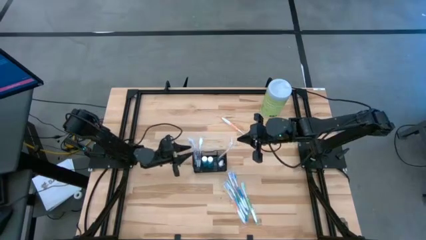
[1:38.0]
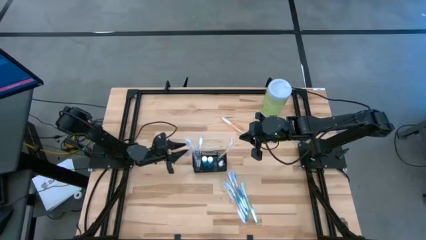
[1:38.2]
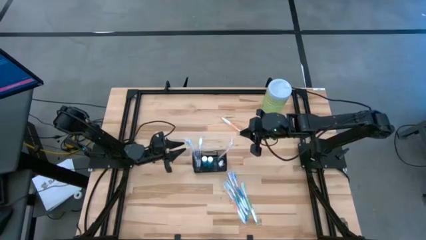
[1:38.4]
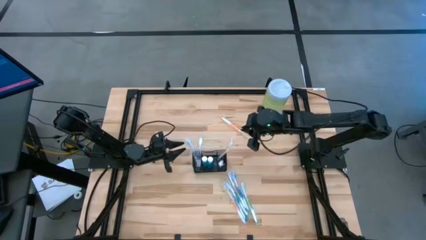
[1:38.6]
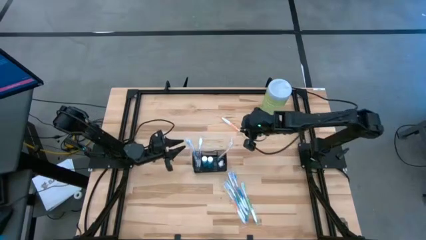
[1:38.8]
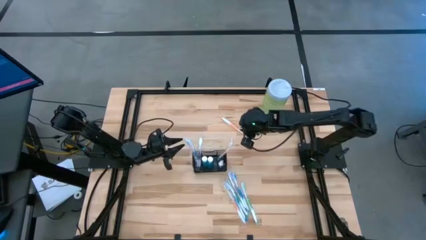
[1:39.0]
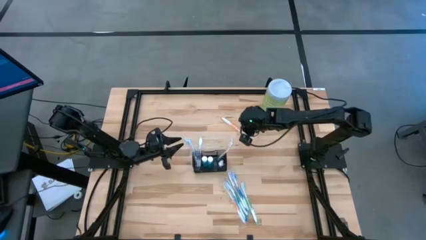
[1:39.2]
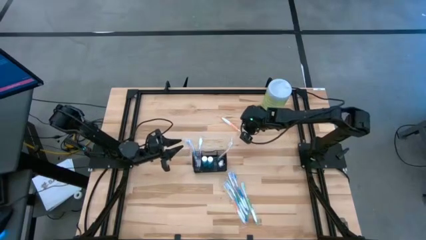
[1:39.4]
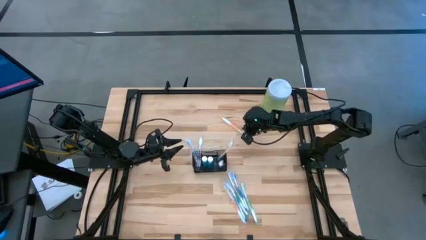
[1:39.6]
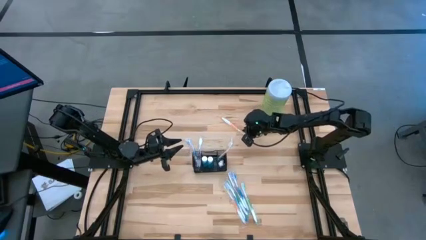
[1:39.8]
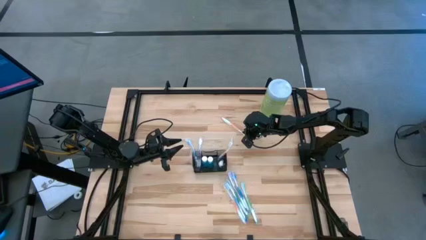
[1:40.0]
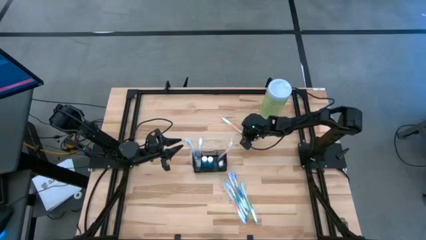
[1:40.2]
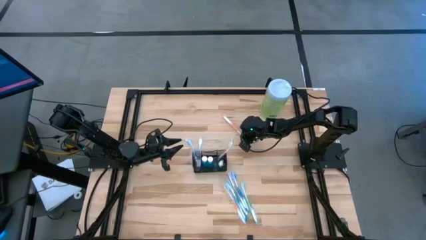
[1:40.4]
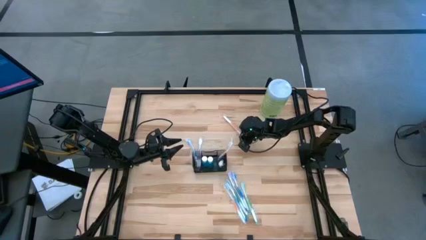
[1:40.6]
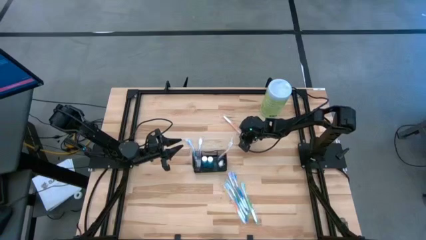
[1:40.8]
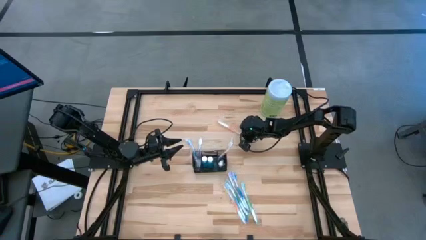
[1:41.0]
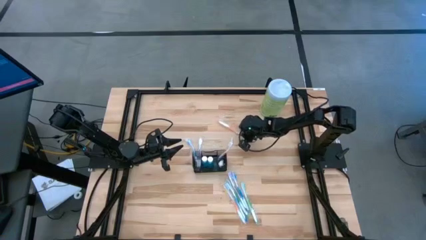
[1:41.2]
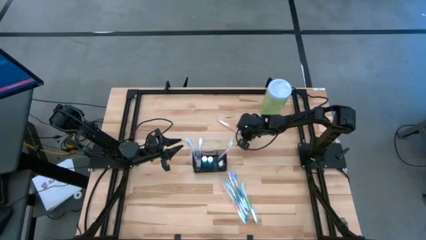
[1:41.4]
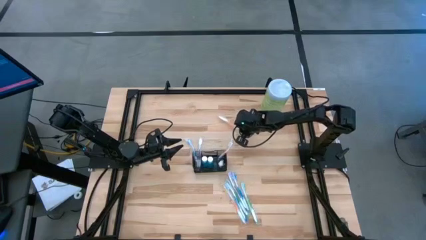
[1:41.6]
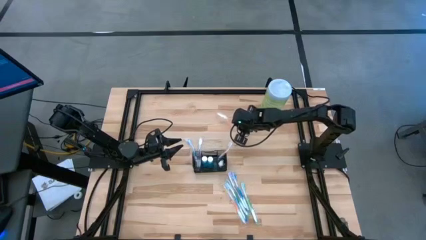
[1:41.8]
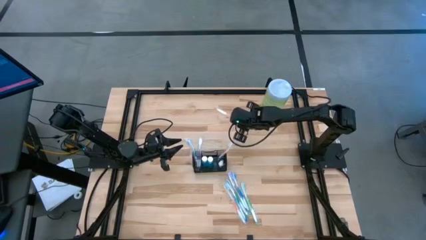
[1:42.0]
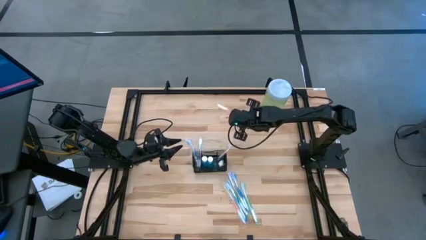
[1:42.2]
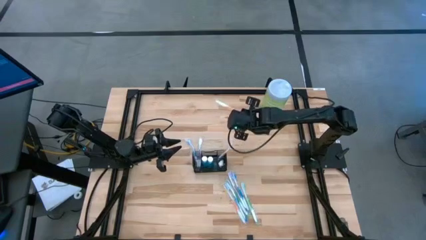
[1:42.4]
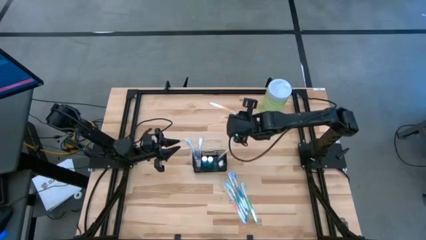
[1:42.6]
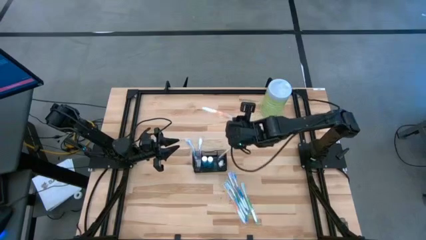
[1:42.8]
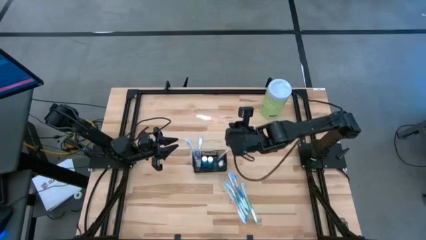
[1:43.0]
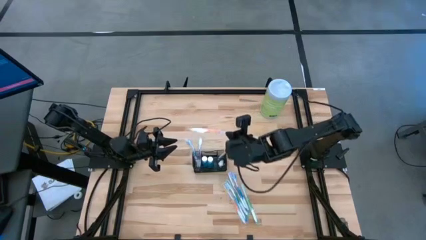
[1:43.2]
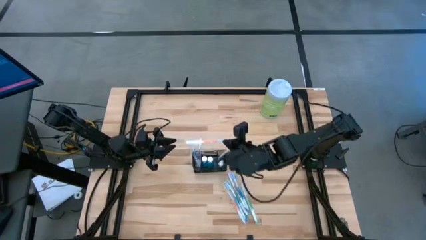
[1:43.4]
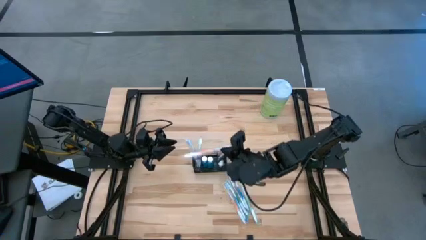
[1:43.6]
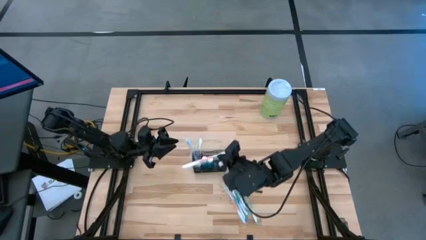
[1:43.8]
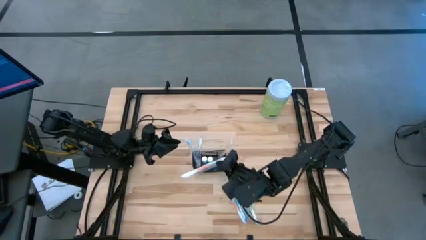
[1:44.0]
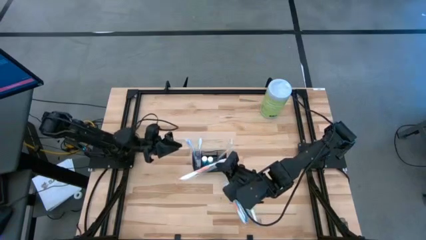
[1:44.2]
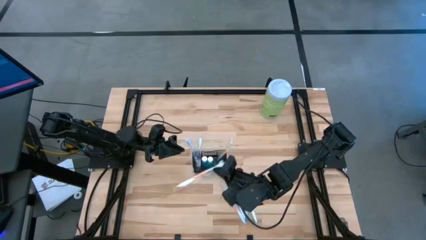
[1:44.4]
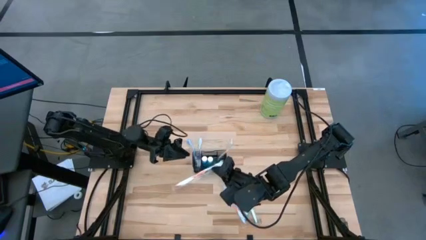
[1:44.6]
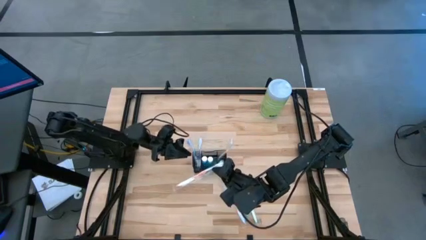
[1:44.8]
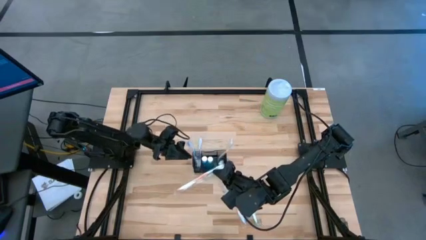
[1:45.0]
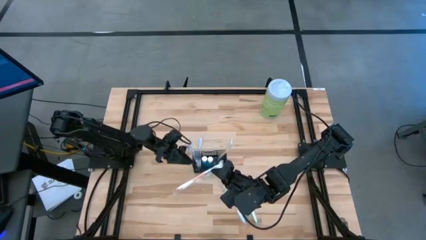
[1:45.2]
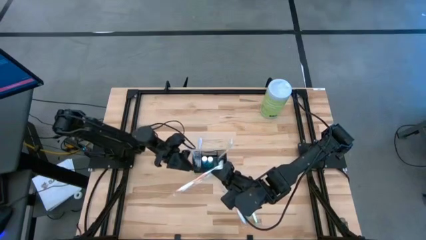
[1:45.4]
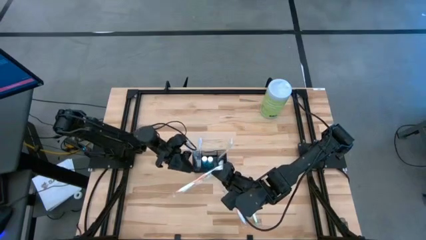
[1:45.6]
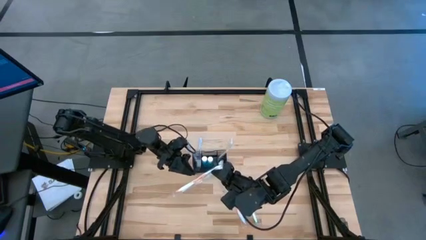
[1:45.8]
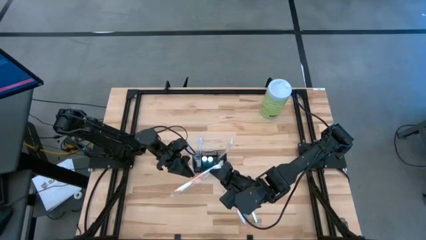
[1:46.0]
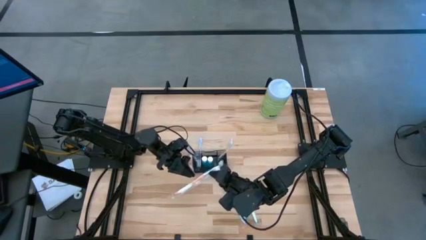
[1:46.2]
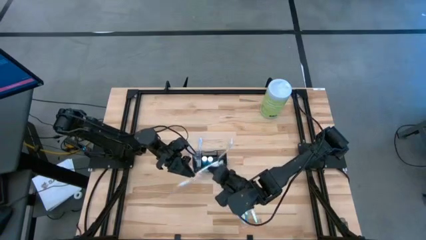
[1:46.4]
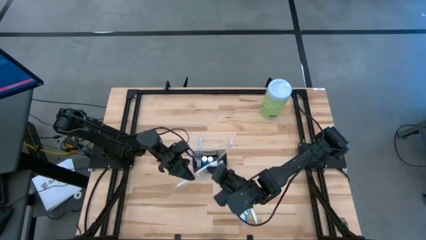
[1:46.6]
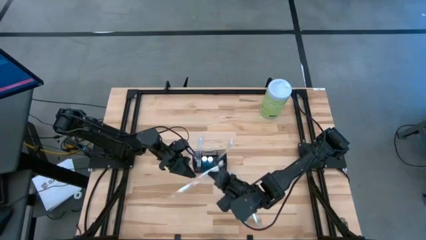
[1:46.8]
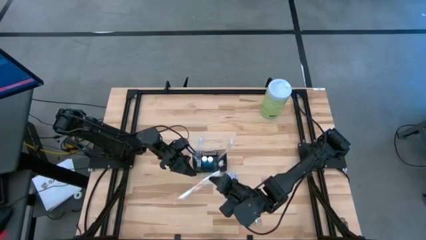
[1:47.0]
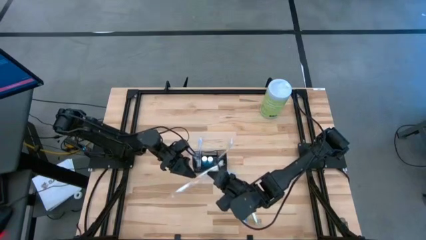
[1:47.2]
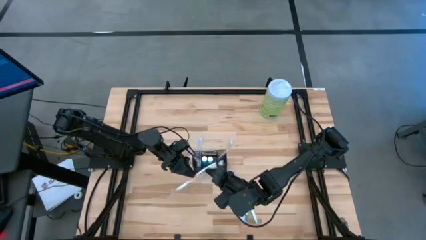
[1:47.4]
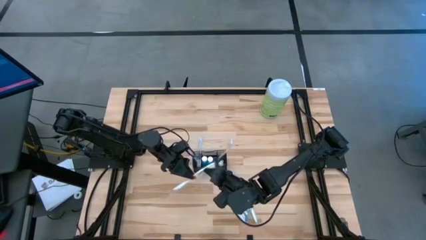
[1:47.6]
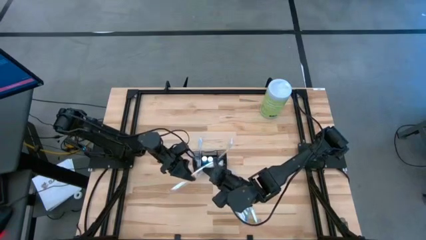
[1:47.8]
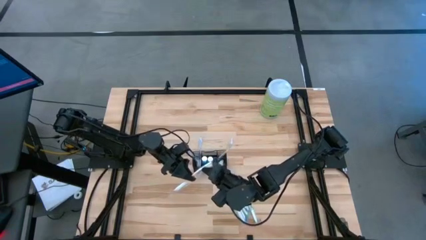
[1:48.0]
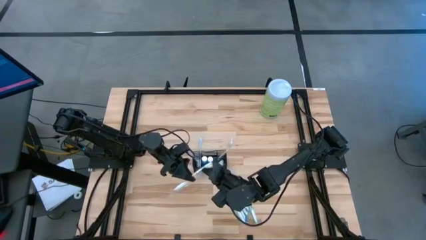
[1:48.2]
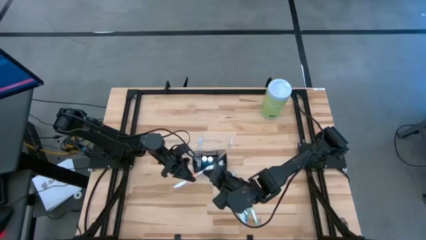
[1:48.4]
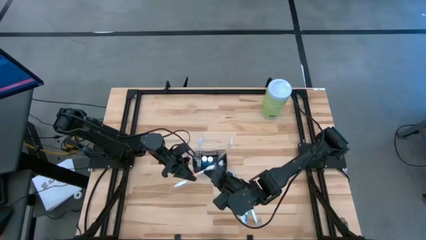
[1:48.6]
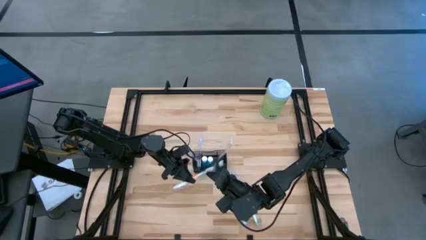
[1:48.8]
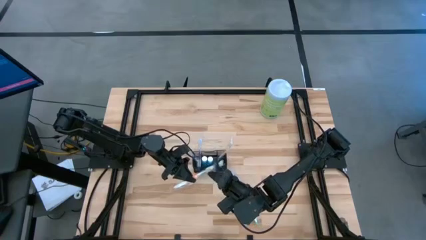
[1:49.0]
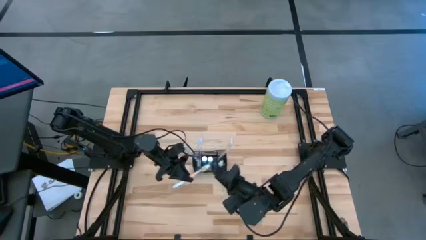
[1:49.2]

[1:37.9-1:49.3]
Task: Pick & Place toothbrushing station
Put the orange toothbrush into the mesh

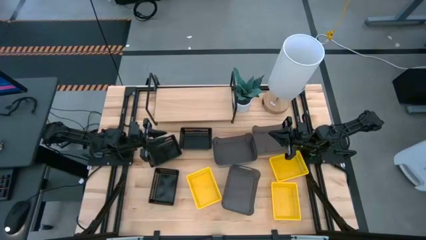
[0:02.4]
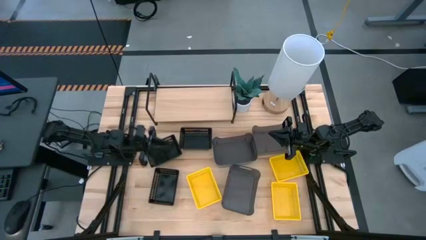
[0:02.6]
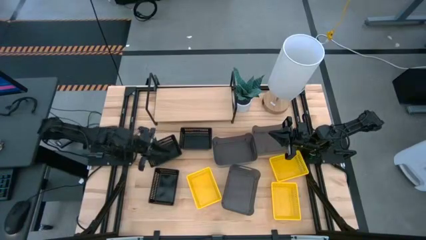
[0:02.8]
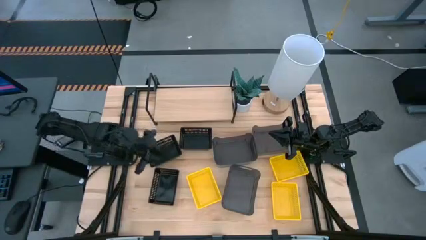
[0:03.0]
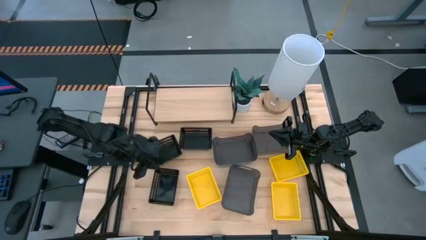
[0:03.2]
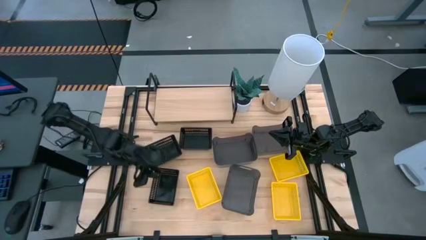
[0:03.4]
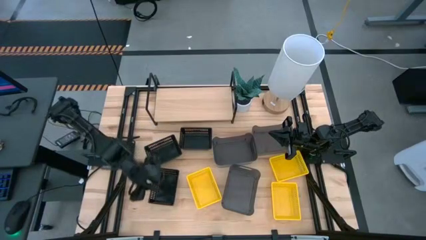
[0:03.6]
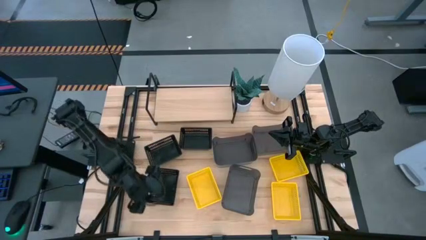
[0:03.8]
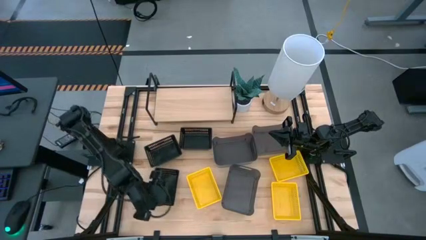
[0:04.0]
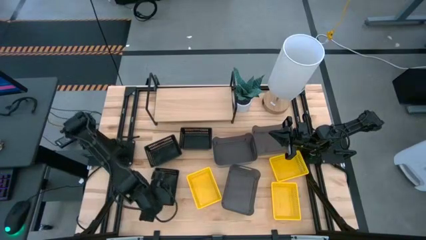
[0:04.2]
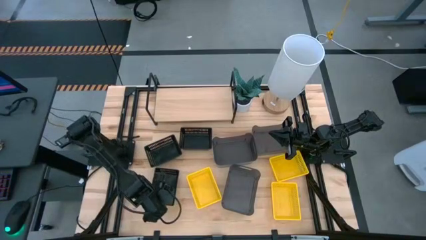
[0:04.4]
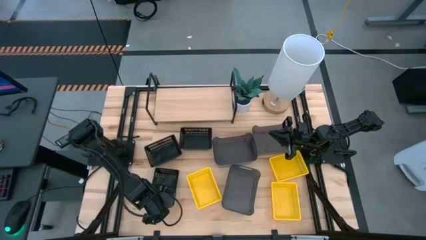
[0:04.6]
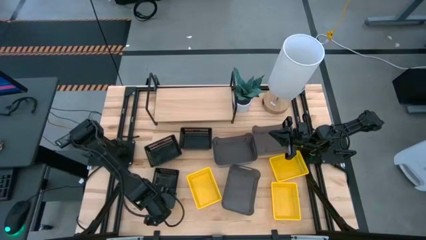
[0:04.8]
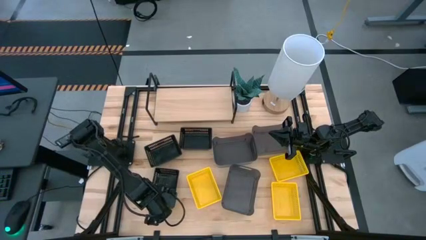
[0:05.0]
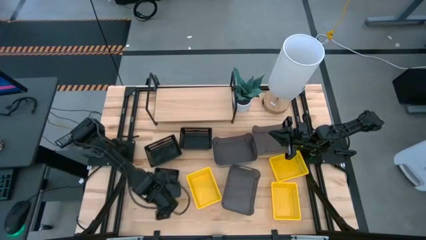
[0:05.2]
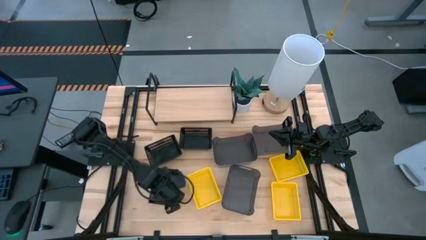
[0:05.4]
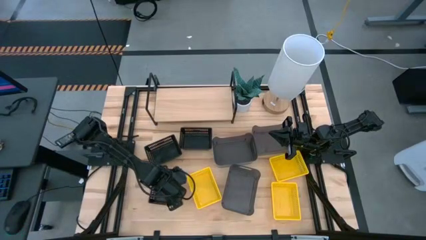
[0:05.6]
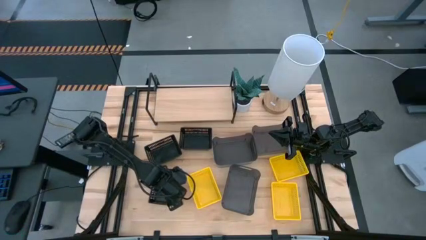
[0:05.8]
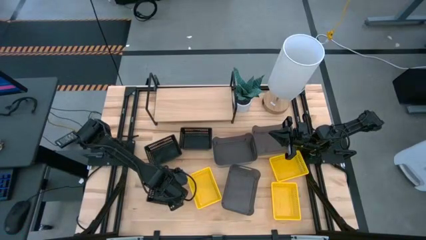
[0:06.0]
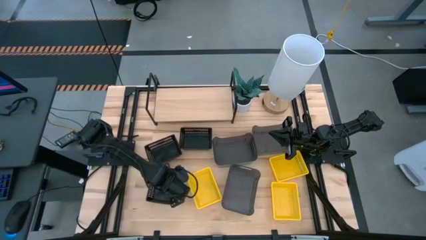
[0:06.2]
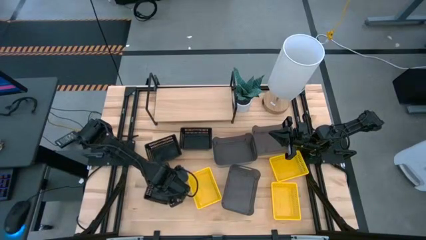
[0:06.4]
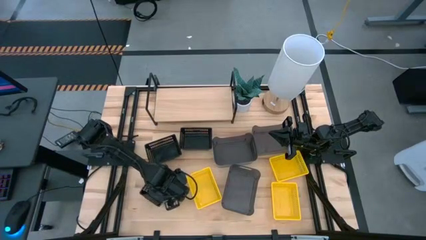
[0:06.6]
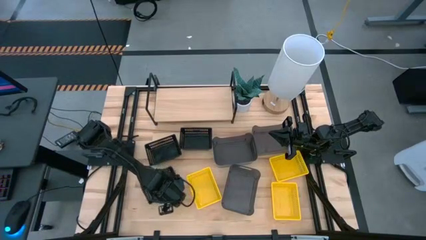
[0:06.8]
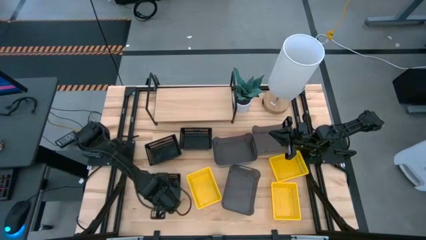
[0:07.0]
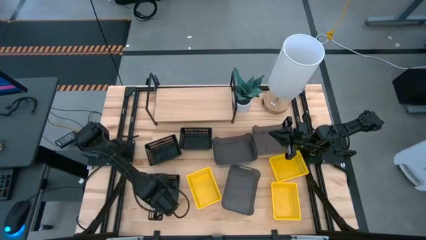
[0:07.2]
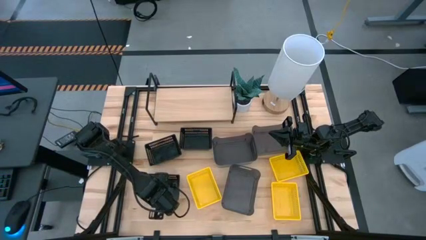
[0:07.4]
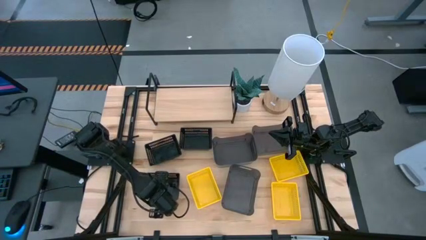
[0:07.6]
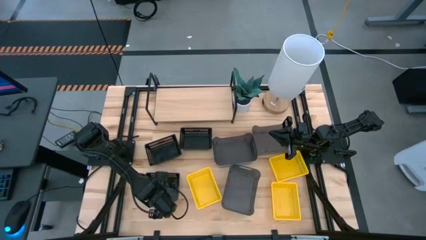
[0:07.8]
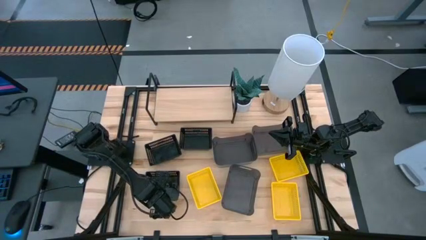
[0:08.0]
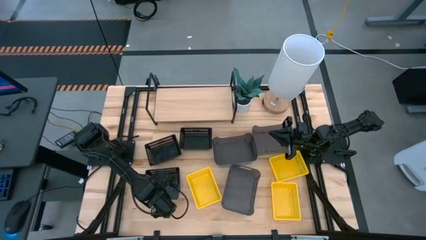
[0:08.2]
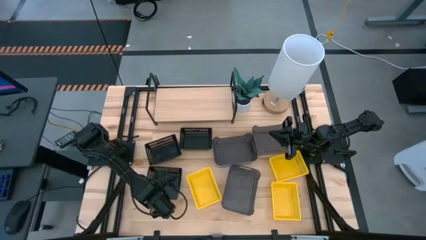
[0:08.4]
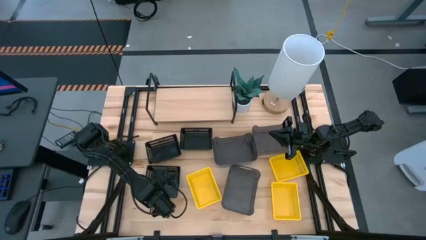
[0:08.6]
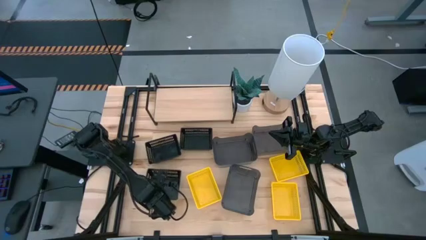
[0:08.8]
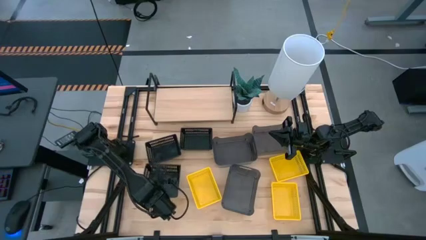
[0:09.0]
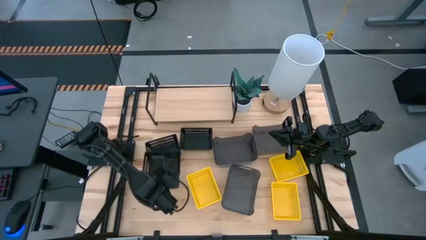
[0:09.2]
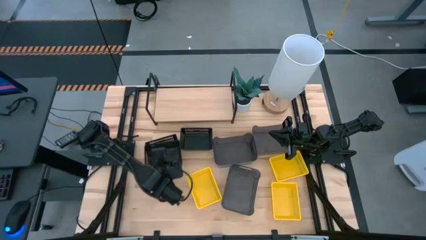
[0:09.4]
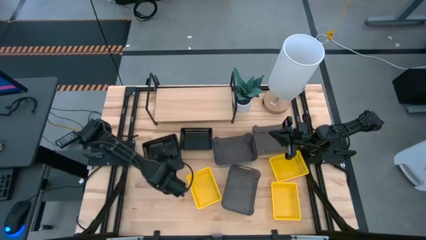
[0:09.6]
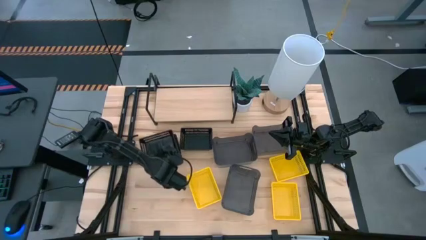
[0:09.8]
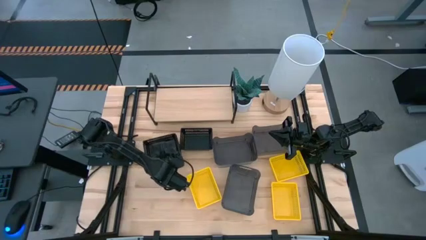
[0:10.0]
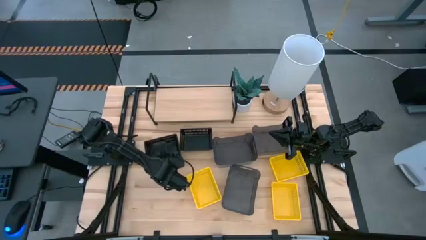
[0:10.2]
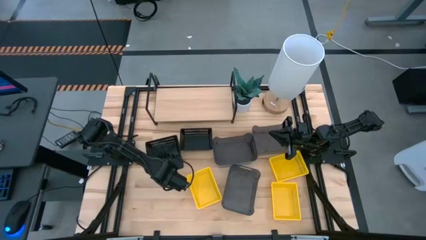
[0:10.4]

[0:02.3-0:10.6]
Task: Stack baskets on shelf by color
Stack the bottom black bin on the top left black bin
